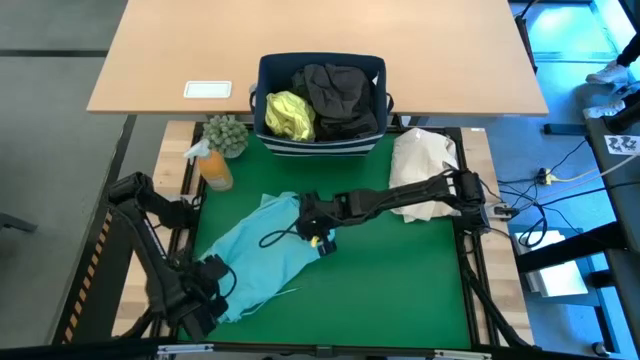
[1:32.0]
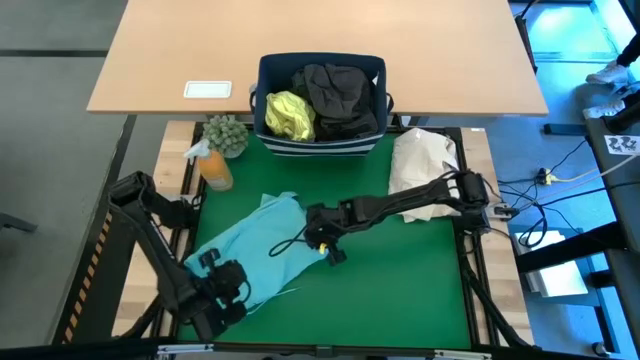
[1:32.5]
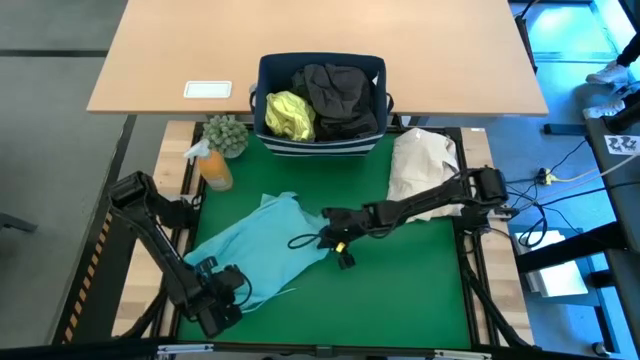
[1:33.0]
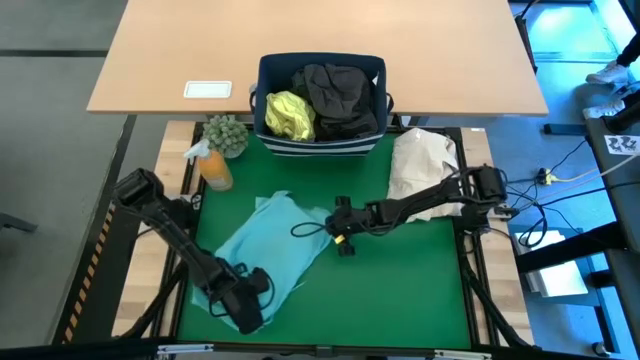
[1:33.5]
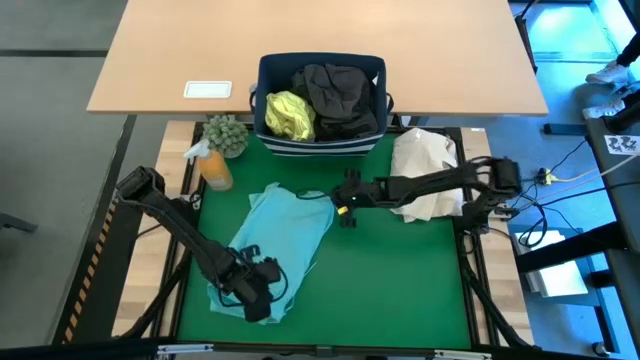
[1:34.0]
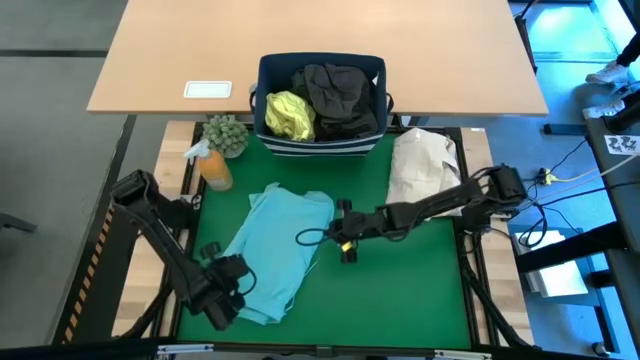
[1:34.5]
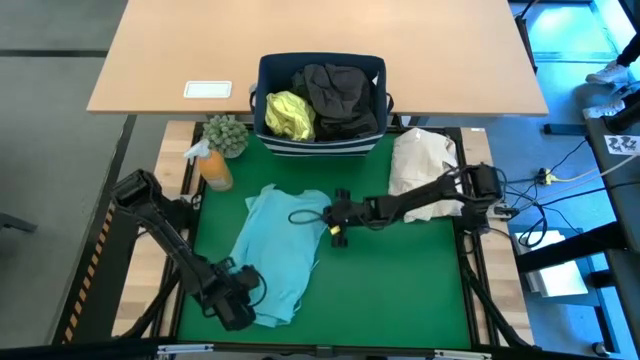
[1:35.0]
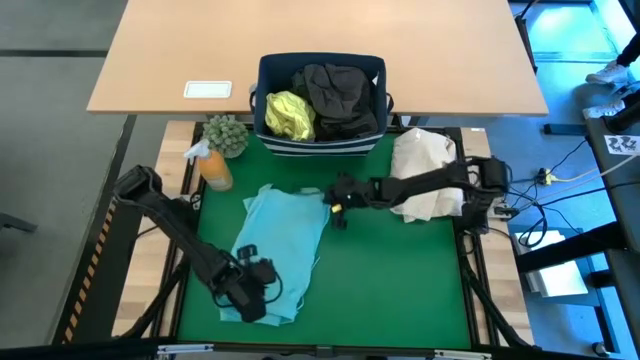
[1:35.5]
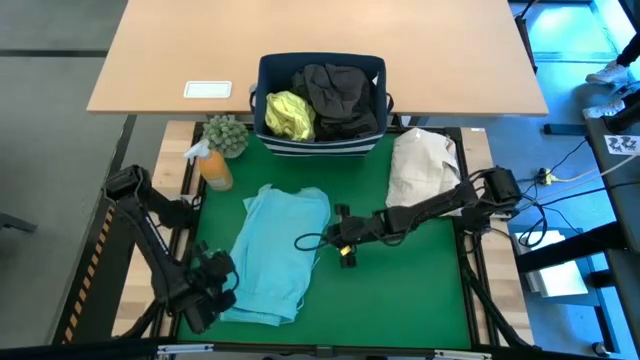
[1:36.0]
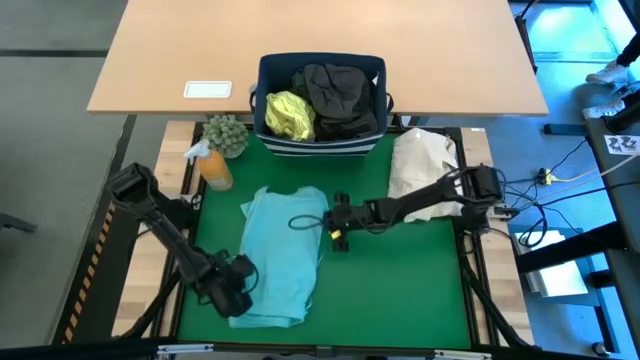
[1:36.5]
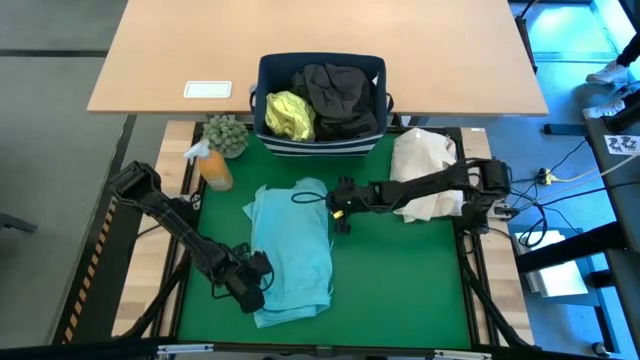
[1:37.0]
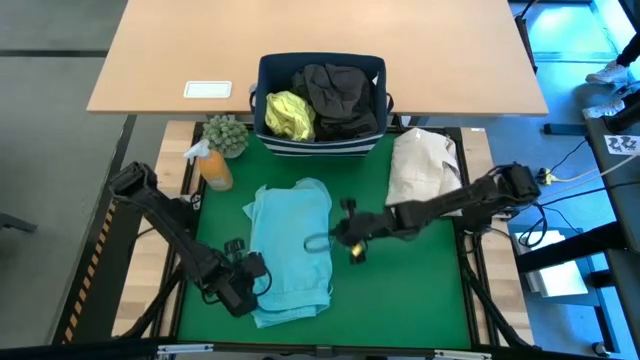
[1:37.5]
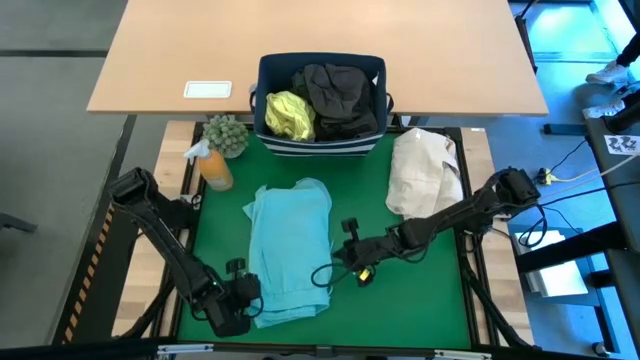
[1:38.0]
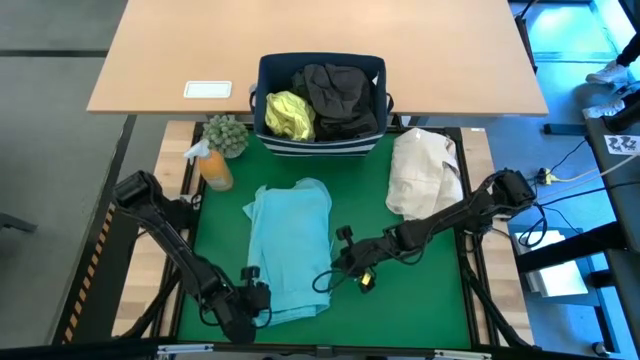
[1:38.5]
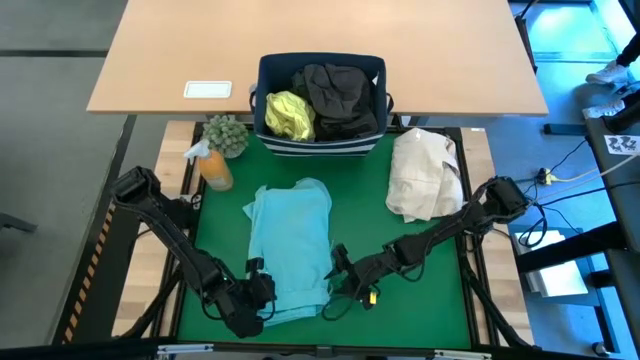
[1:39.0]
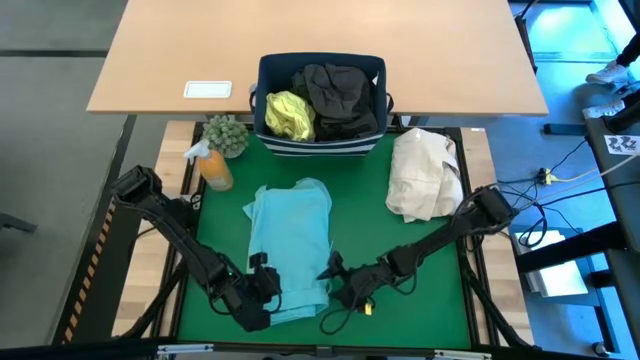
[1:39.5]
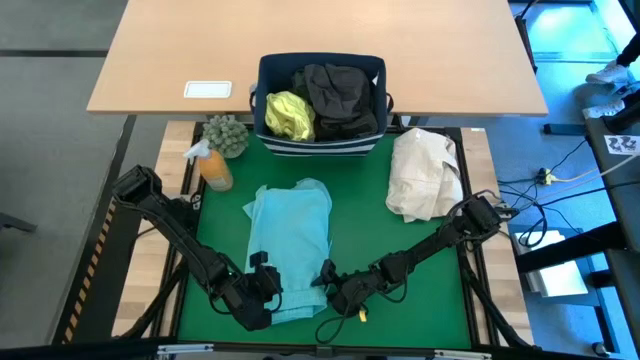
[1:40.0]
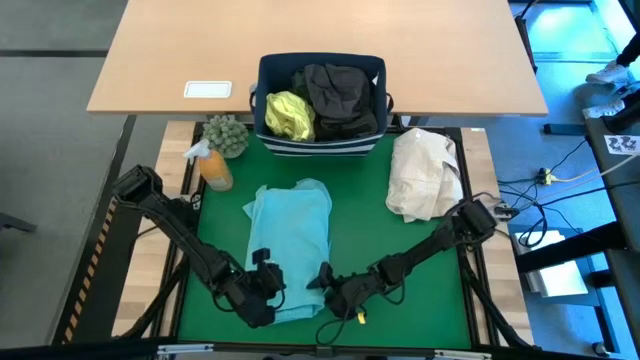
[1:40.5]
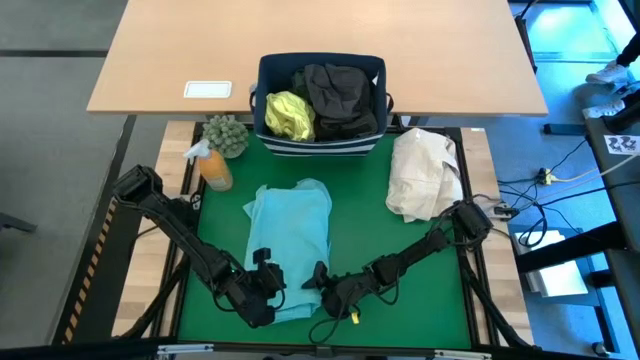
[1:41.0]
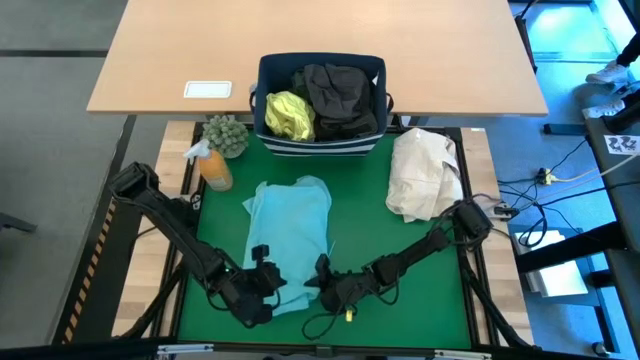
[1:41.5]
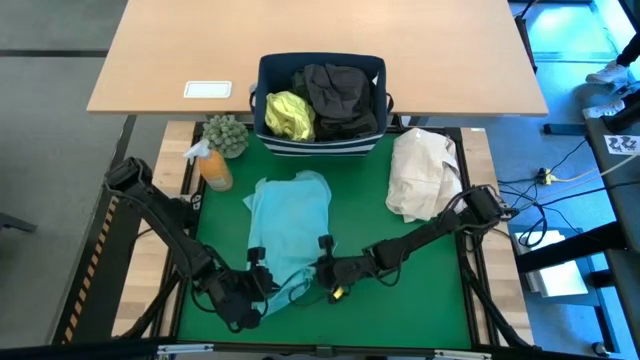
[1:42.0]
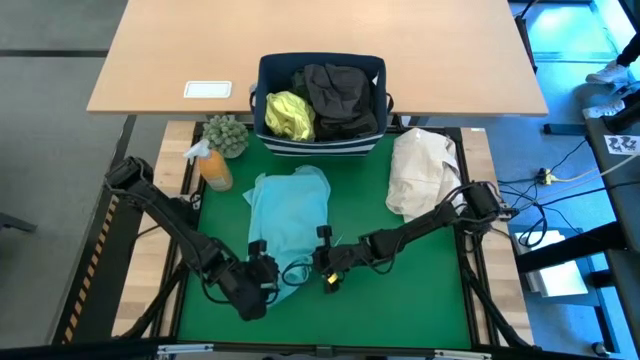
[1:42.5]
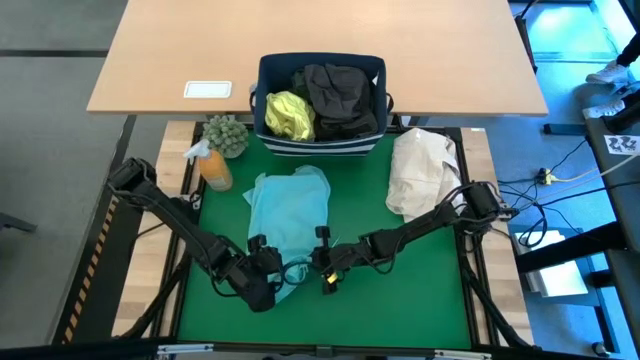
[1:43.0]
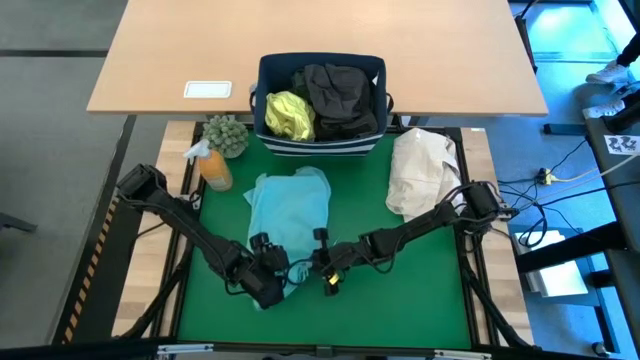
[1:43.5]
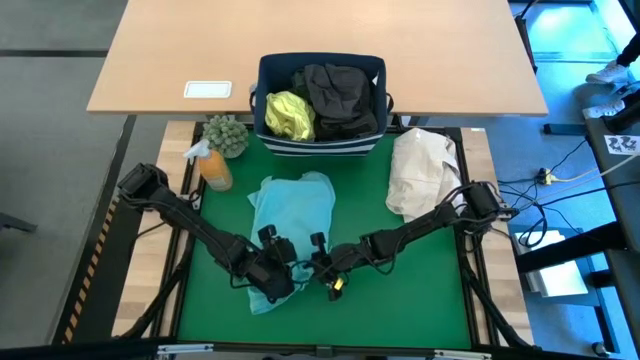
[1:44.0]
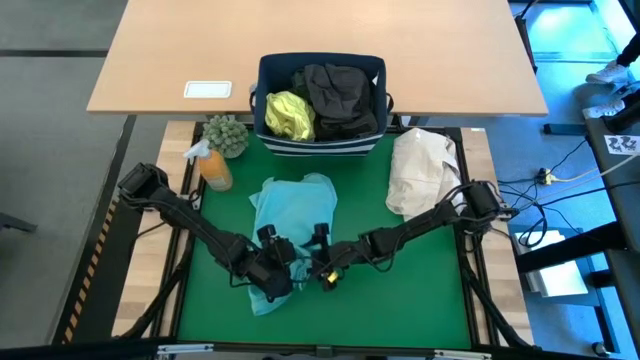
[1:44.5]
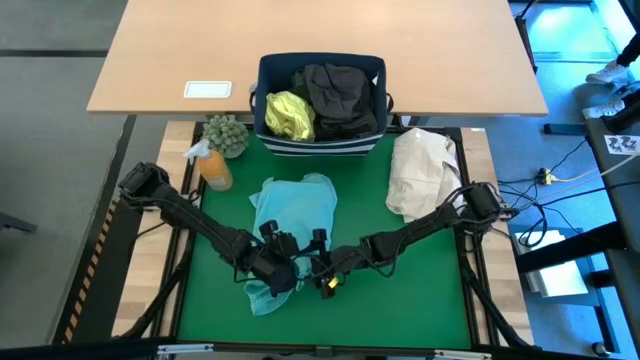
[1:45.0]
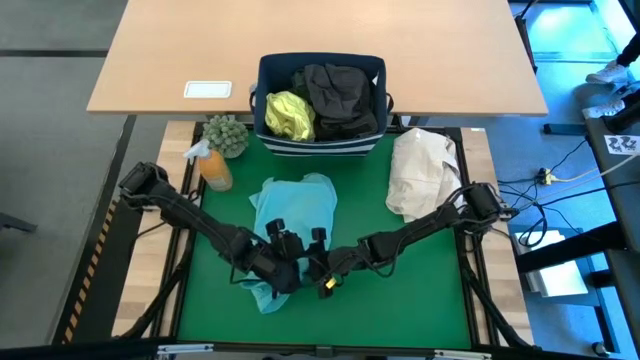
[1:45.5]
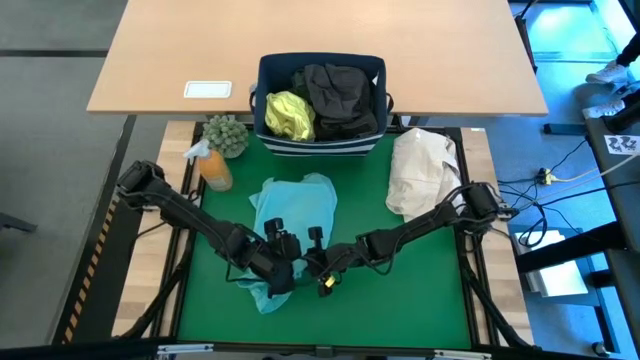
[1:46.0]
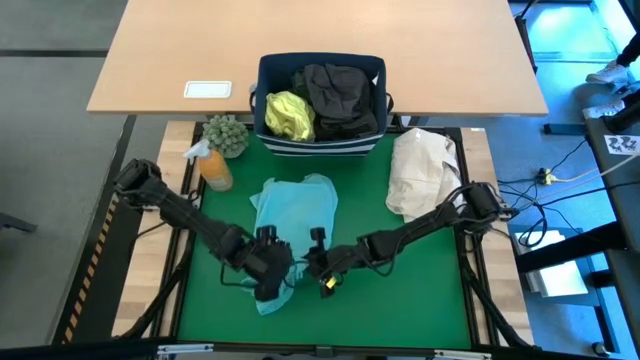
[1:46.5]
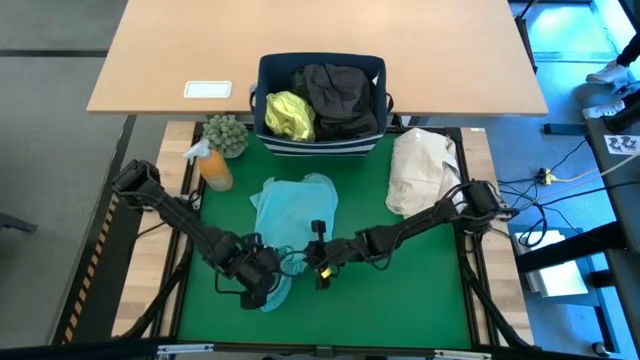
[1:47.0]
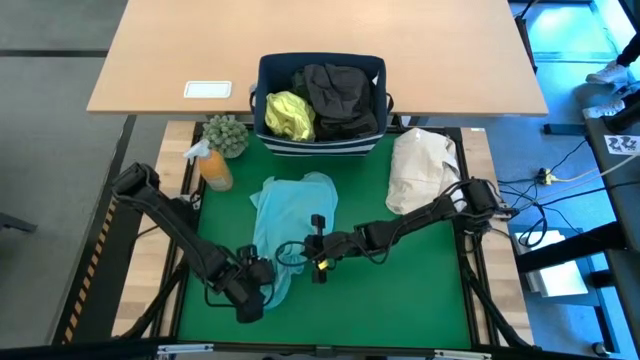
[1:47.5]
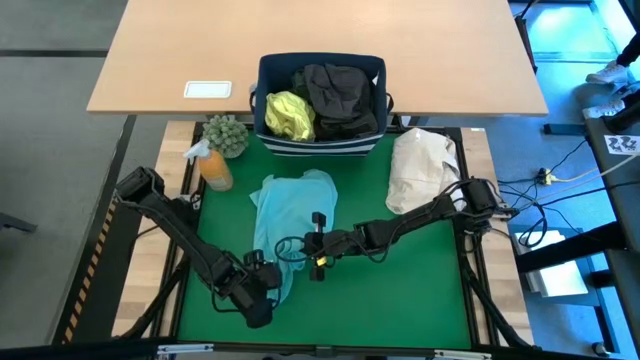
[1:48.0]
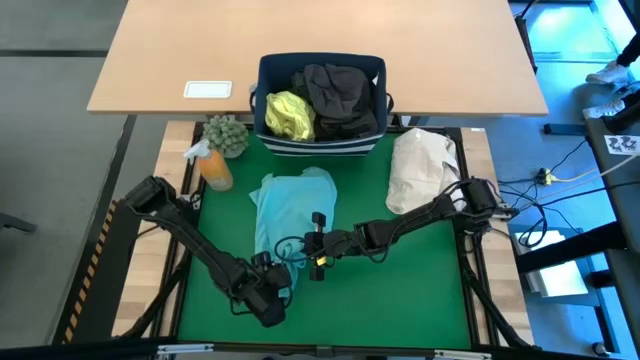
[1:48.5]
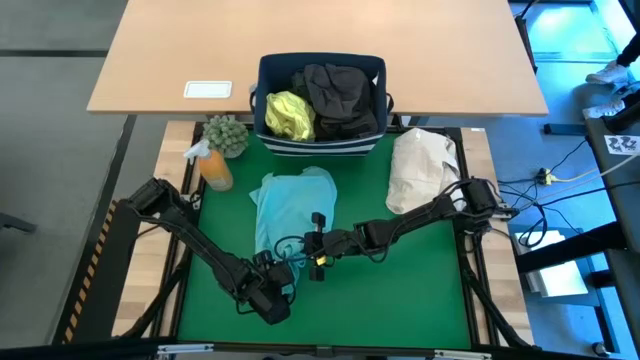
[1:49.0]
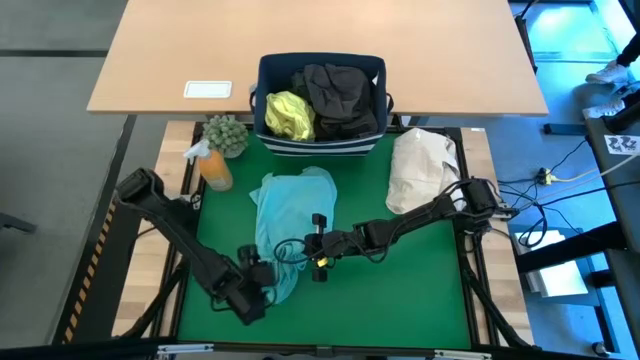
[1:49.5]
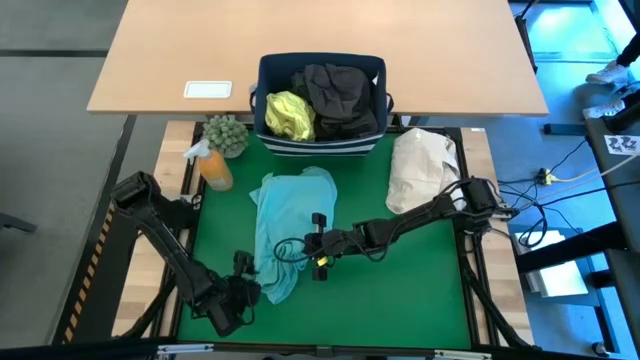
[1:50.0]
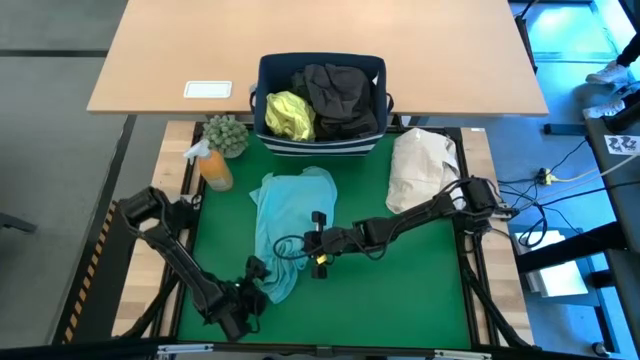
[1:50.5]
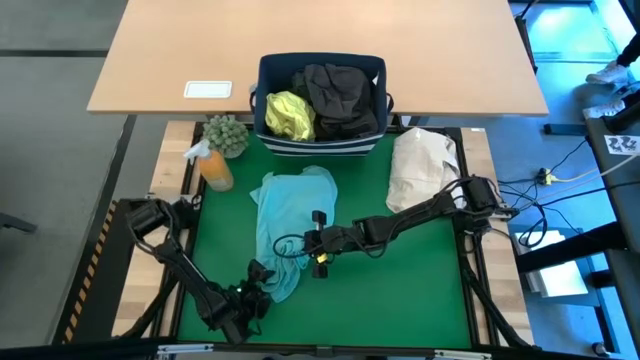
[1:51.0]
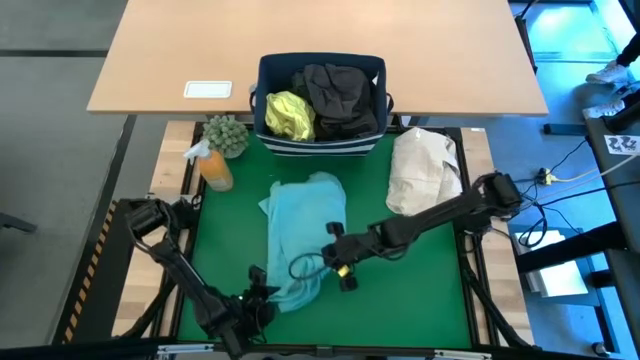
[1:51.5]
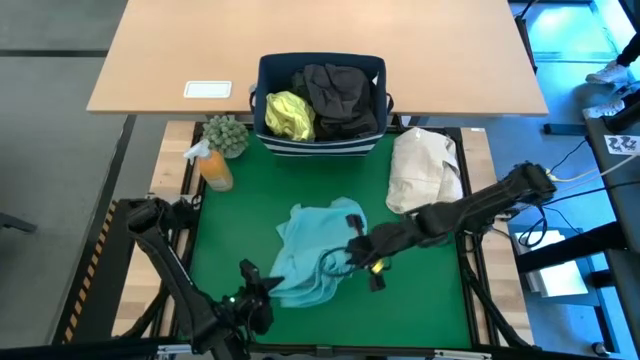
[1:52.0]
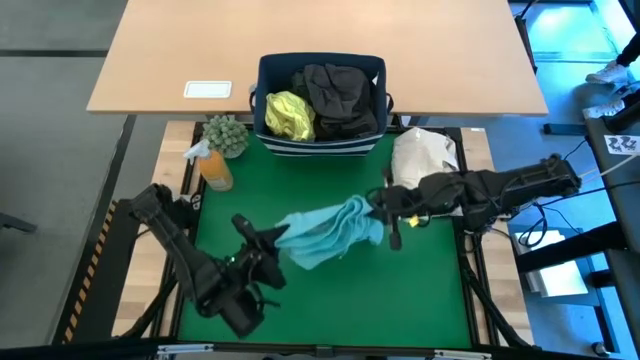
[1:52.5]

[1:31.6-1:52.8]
Task: Fold laundry
Fold the blue shorts
